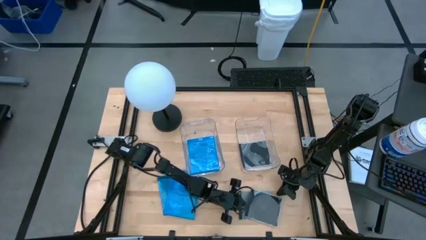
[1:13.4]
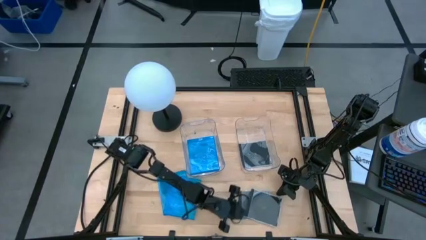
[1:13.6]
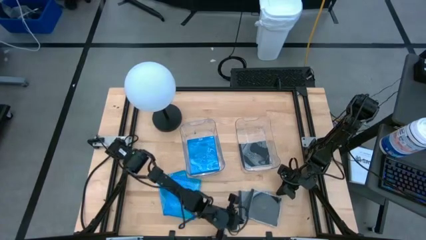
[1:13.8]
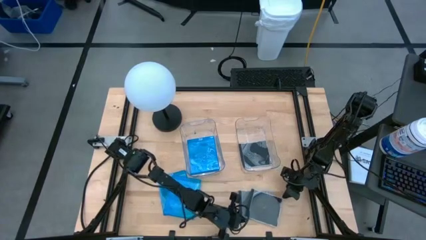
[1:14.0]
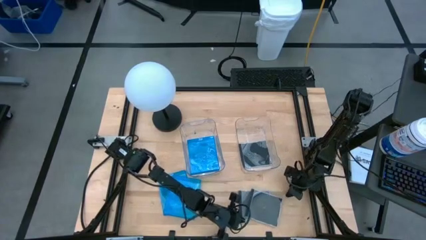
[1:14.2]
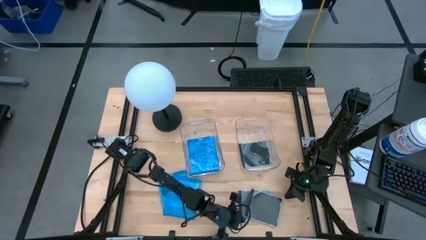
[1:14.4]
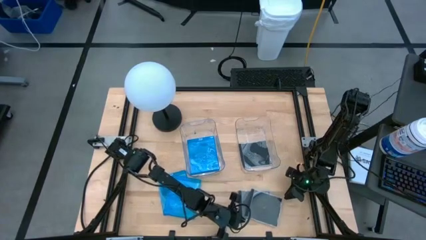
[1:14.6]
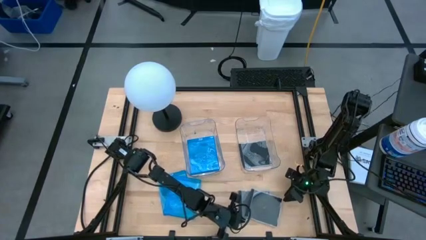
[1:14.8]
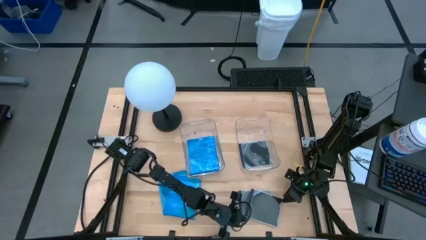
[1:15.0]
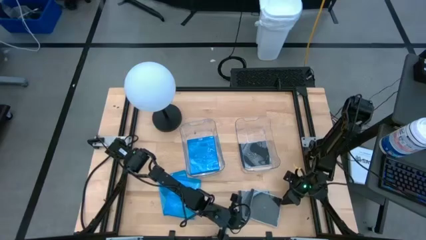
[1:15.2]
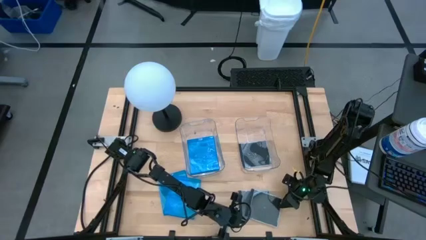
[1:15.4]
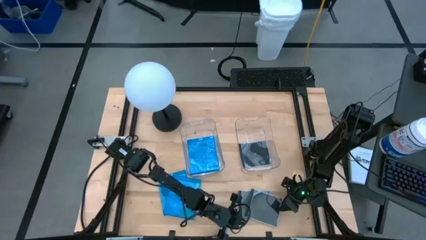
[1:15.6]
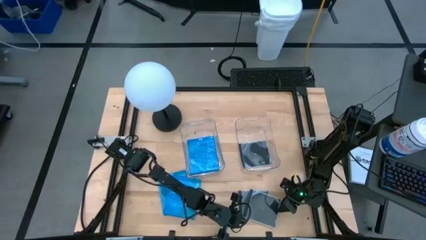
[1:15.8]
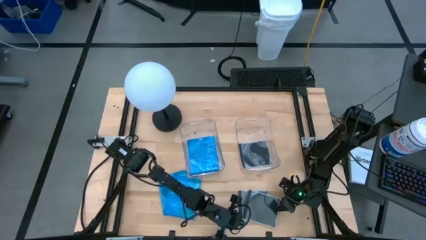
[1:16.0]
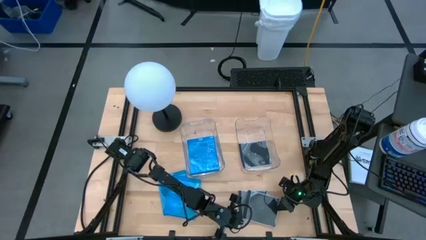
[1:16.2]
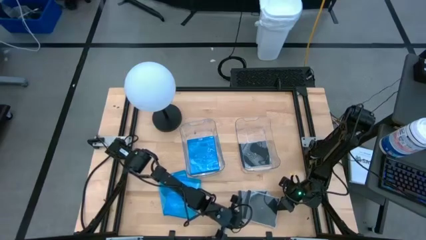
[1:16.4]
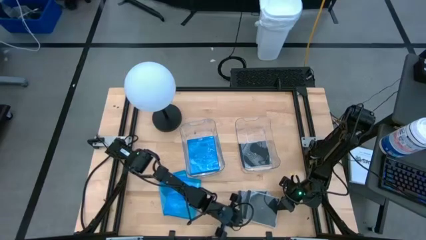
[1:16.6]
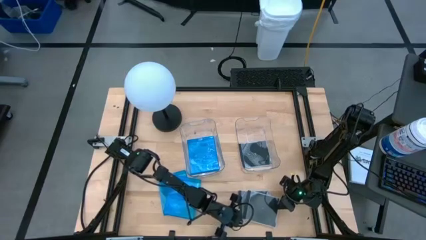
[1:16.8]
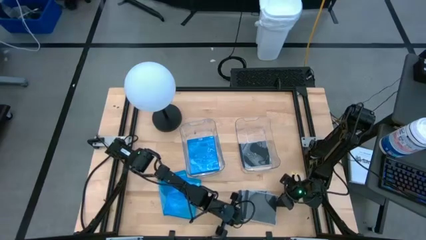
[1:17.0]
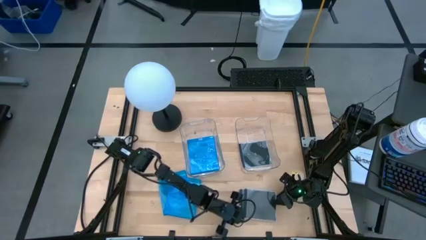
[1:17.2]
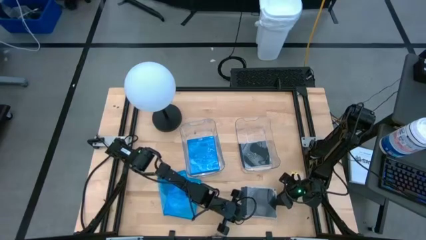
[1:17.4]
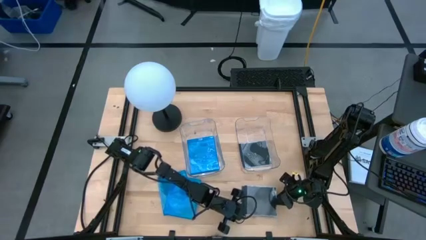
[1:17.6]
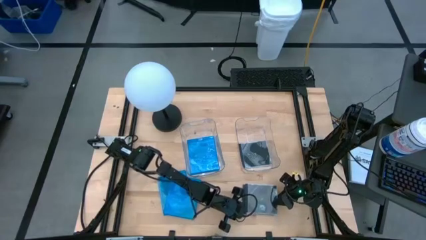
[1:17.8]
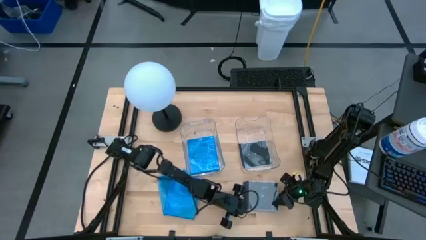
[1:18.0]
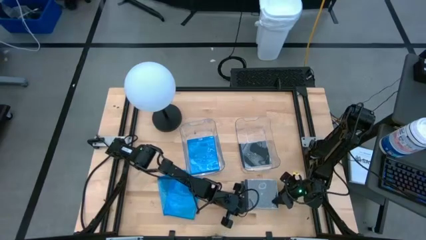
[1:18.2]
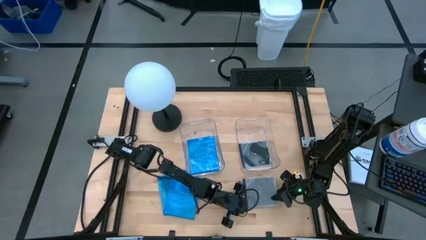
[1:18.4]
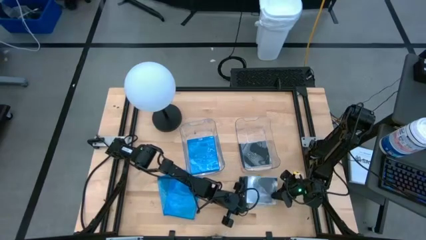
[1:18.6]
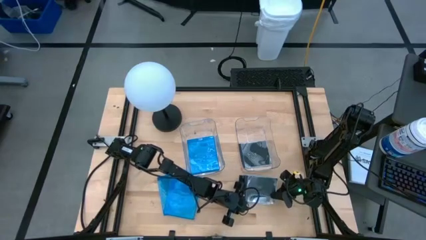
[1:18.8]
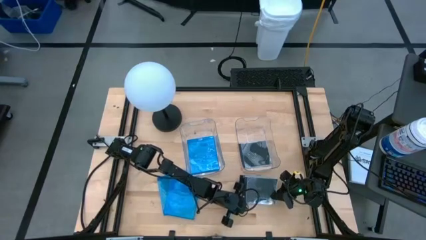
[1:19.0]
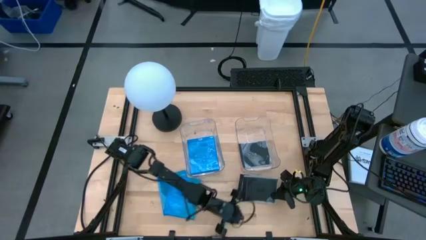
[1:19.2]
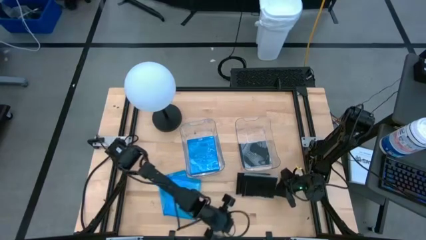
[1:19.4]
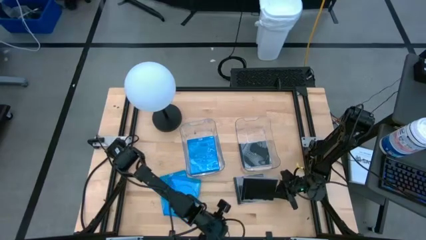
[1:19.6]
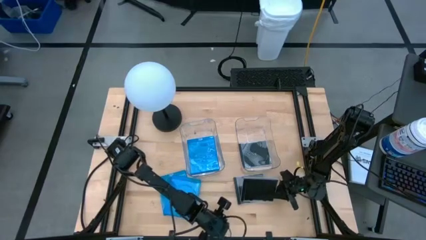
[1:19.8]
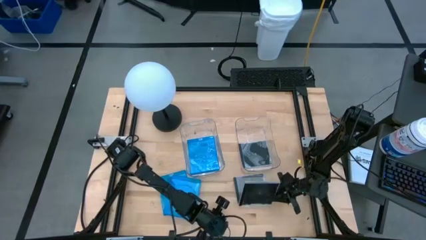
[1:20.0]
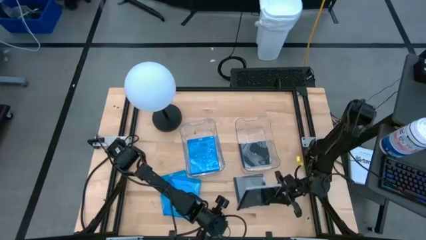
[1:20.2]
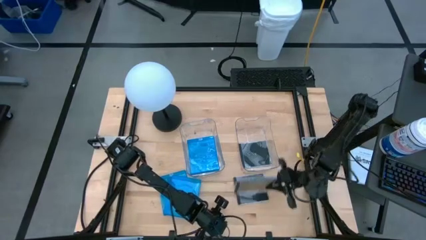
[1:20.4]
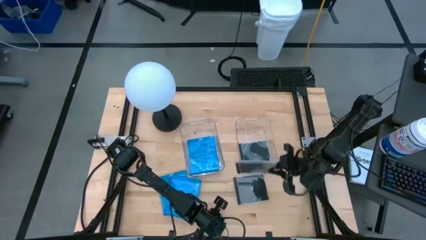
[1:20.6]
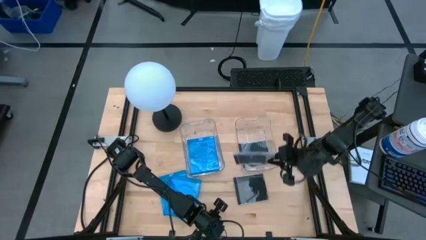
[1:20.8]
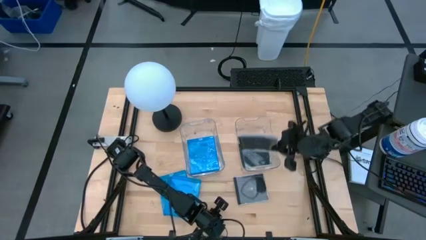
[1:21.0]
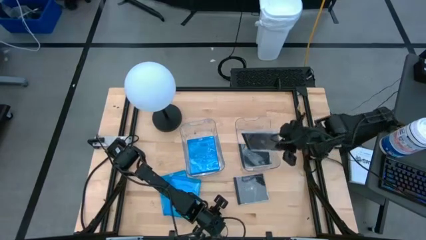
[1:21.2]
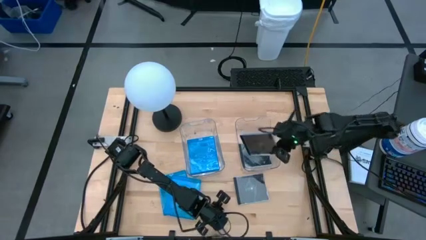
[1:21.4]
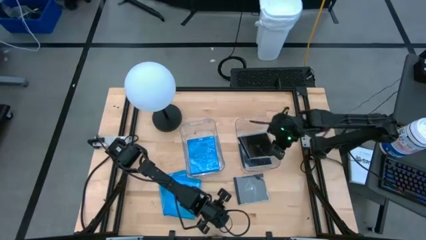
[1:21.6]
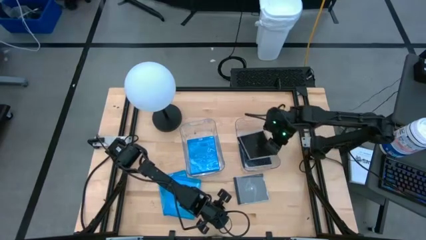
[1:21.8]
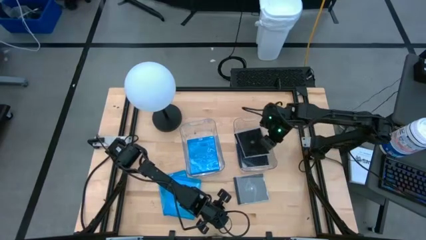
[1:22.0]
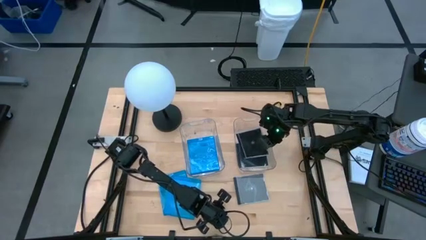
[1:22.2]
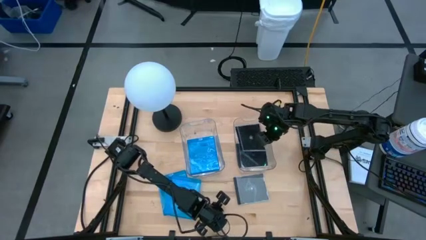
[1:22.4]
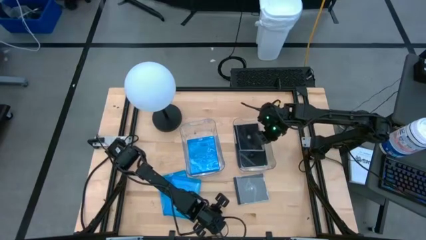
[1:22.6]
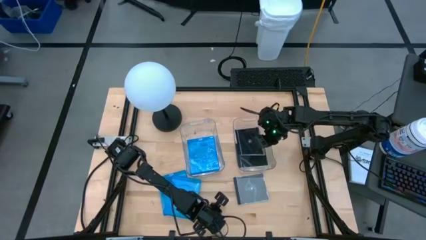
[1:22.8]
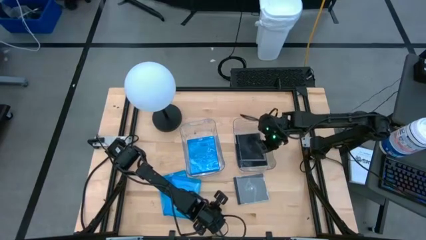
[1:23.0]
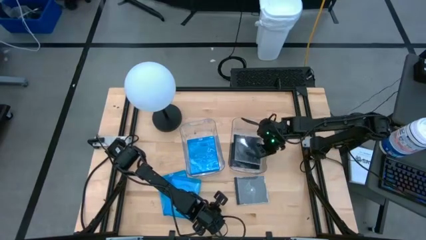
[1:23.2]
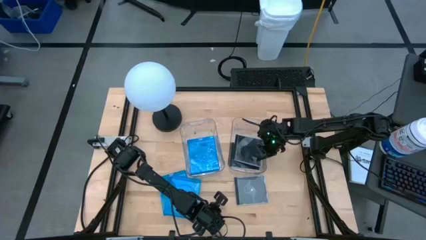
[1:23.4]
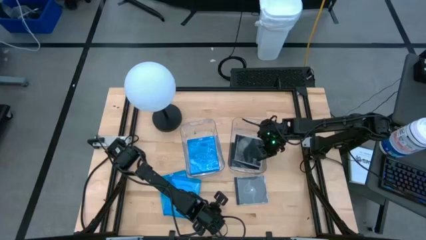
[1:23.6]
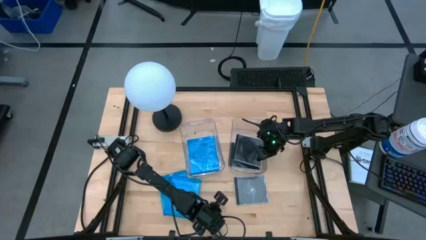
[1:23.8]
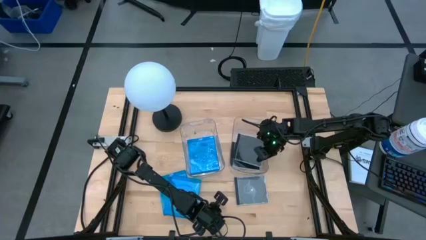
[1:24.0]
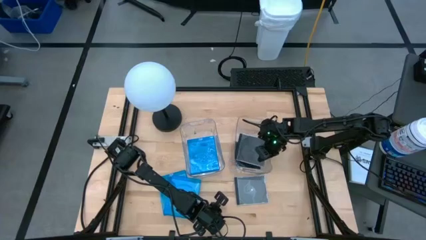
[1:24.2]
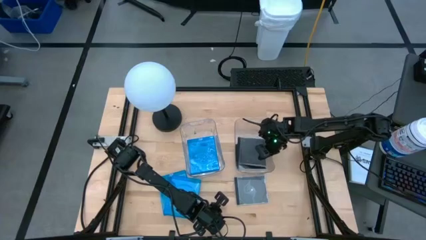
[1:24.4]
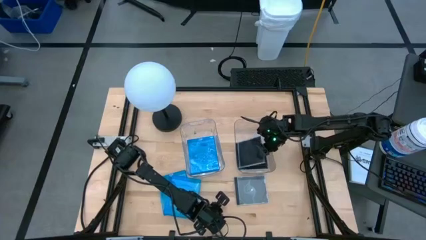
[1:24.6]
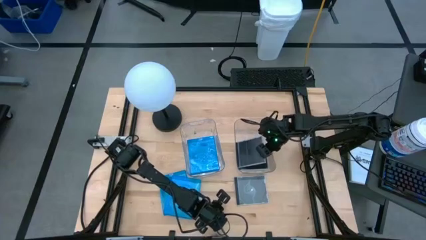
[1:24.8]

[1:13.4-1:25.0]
Task: Pick & place jewel cases by type
Put the black CD case into the right transparent bin

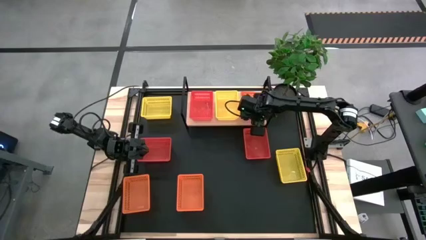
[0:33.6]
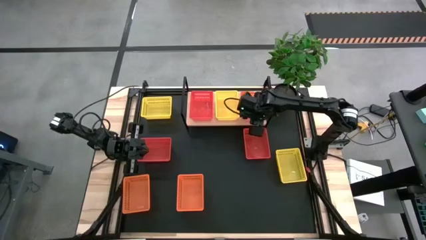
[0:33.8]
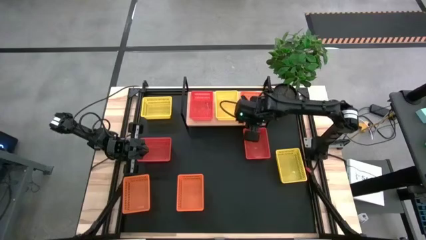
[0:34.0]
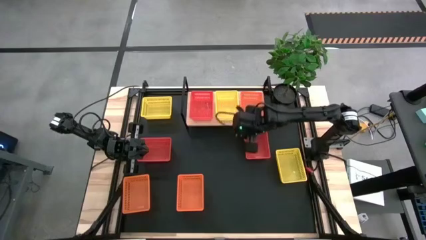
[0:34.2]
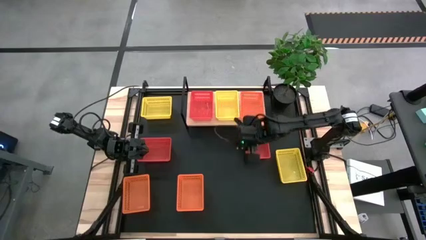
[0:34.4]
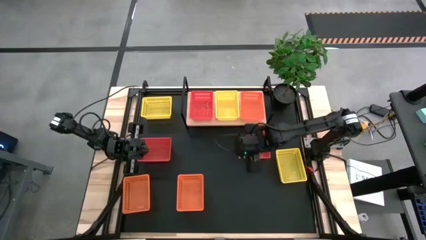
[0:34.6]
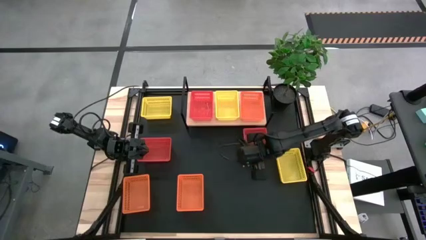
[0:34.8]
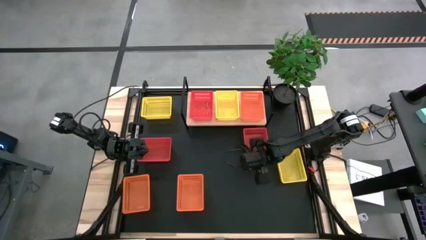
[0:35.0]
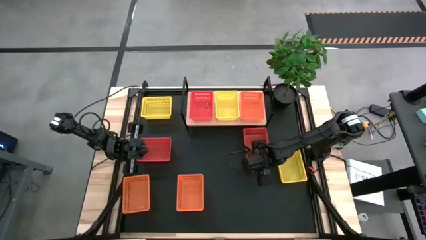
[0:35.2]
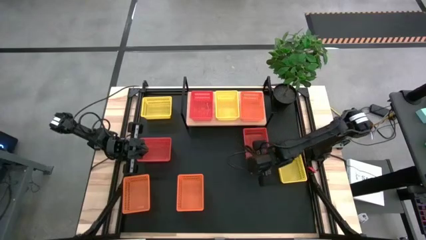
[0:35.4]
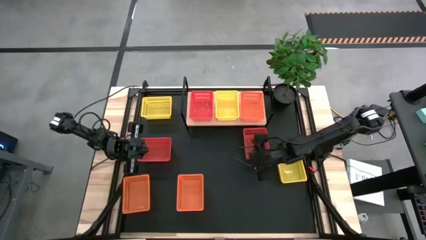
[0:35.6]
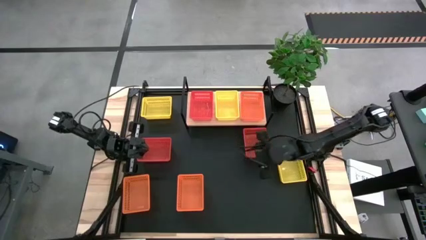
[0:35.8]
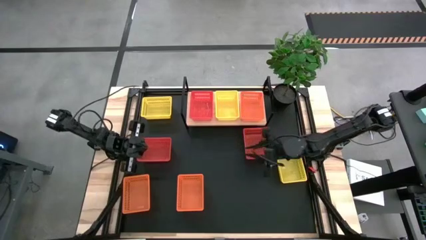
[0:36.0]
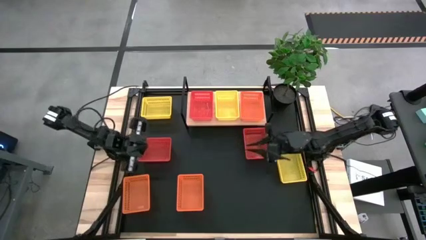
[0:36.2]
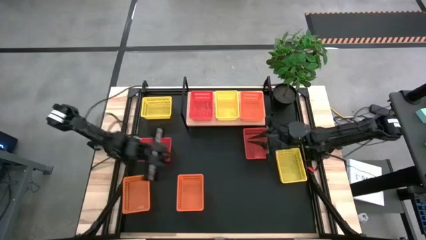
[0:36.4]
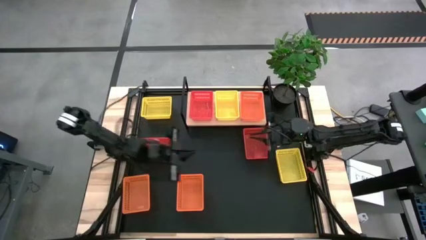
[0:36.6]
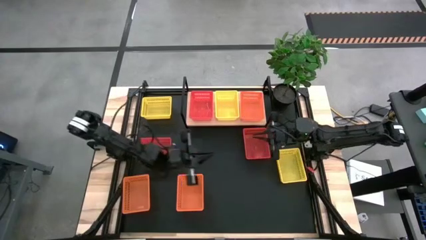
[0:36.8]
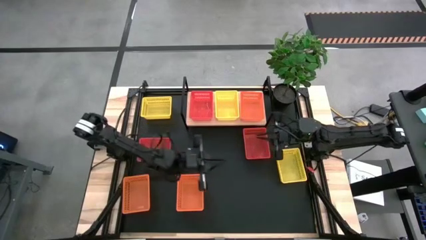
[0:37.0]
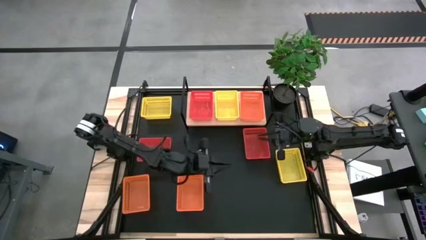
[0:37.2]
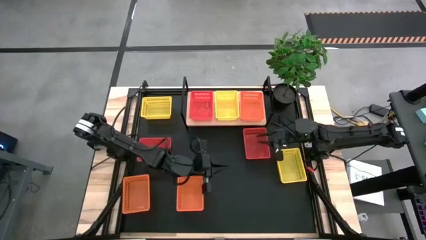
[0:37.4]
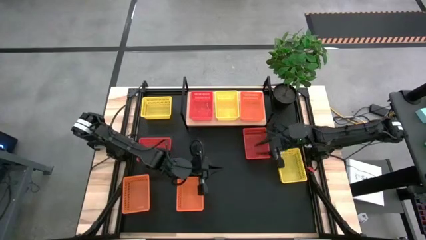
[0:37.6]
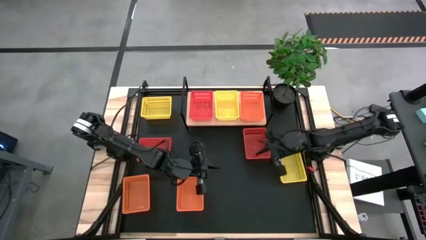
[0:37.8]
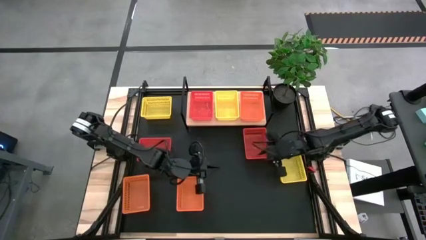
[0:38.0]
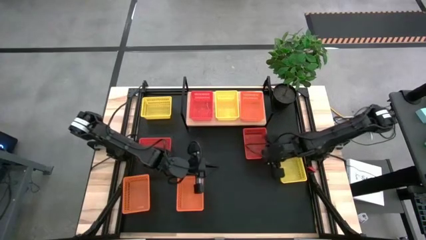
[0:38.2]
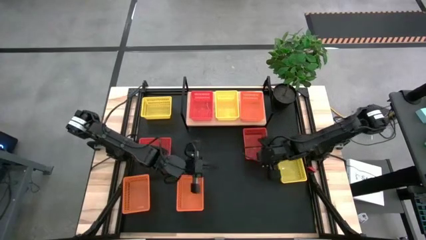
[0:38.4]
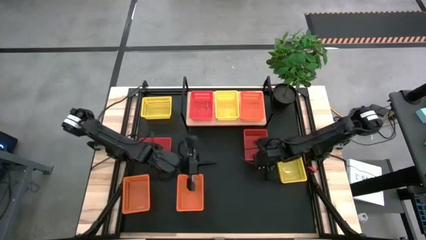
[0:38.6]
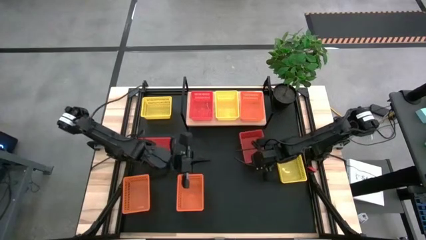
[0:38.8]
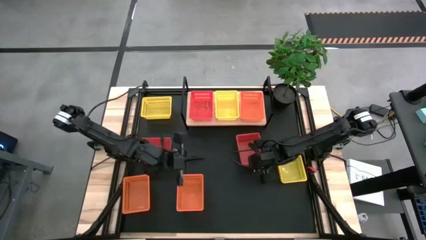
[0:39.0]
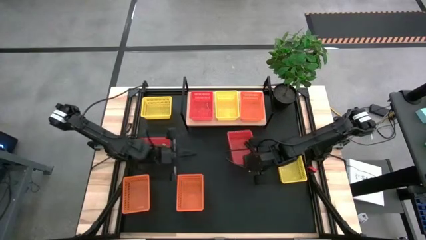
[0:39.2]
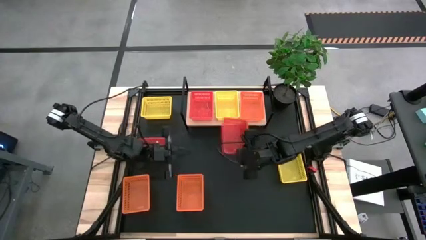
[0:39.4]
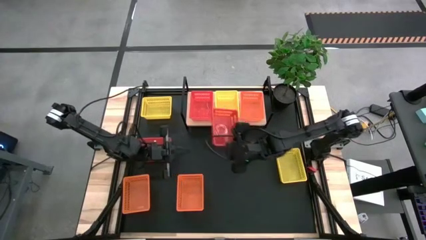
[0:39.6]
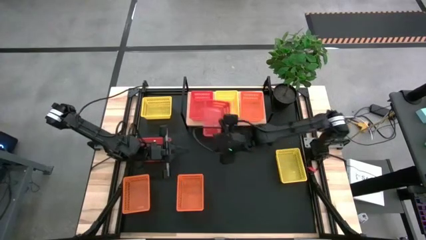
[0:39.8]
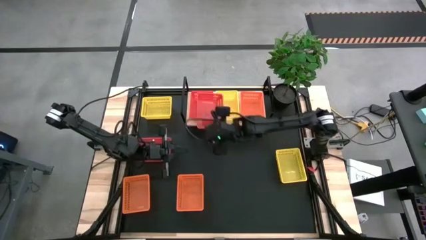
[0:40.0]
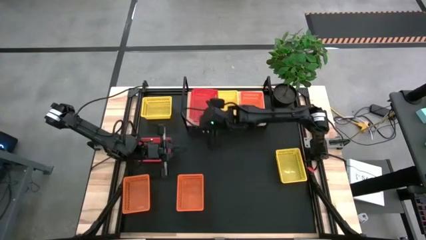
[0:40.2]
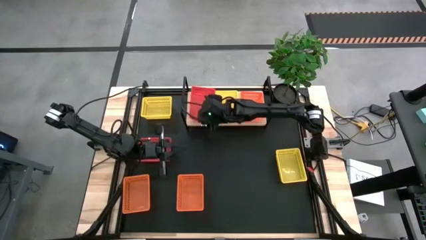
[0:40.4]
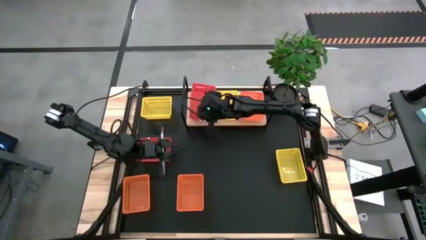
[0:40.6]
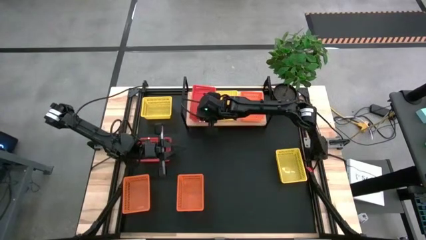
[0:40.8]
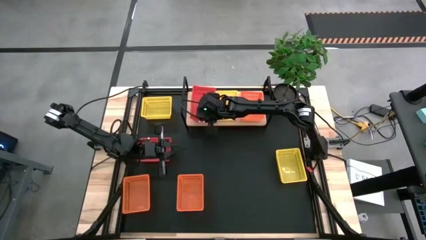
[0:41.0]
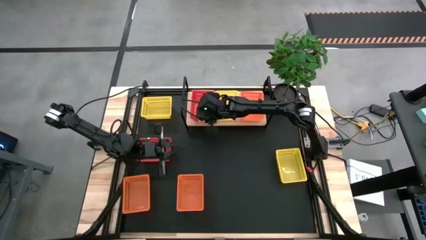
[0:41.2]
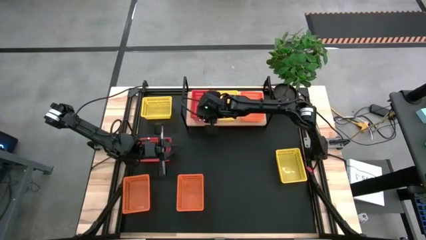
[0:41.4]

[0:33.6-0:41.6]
Task: Stack baskets on shelf by color
Stack the right red bin on top of the red bin on the shelf
